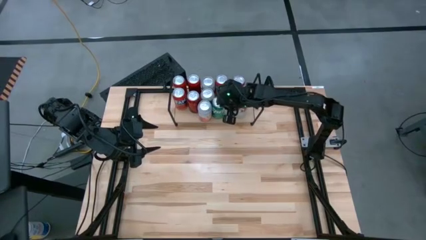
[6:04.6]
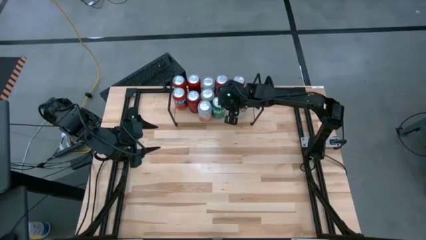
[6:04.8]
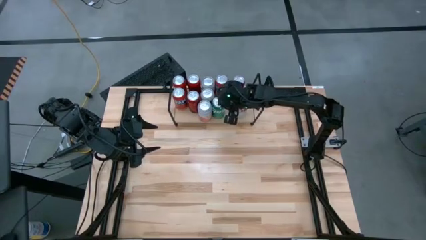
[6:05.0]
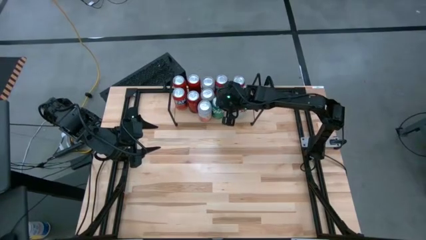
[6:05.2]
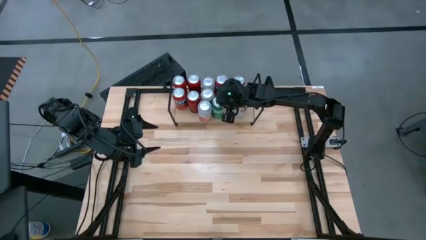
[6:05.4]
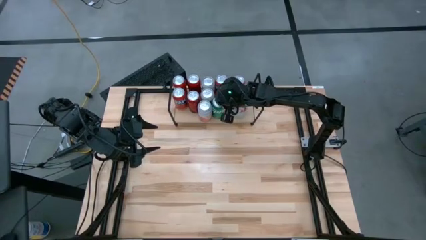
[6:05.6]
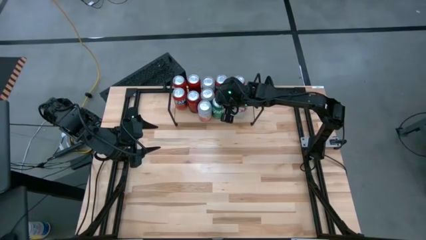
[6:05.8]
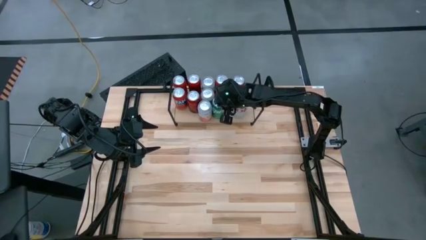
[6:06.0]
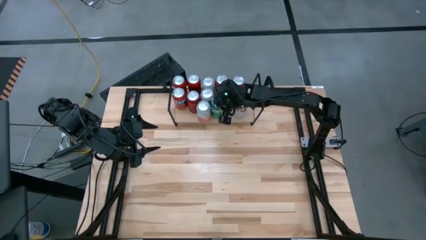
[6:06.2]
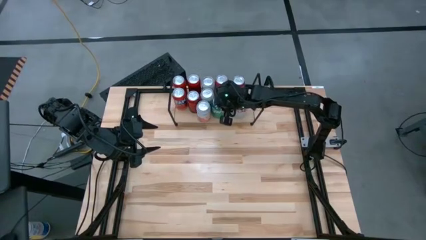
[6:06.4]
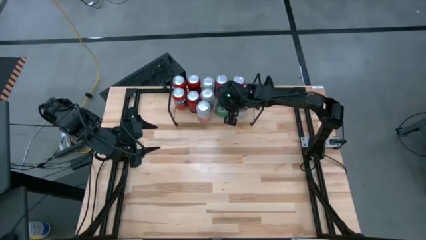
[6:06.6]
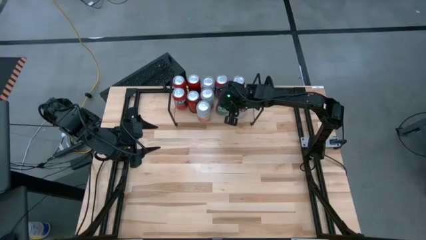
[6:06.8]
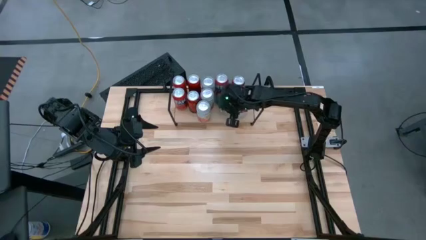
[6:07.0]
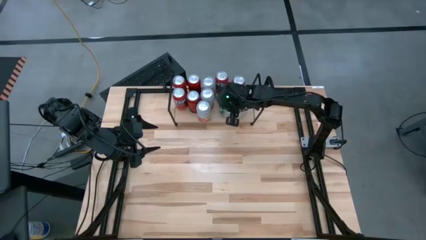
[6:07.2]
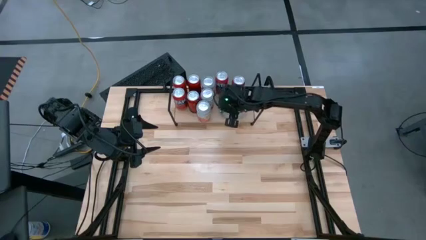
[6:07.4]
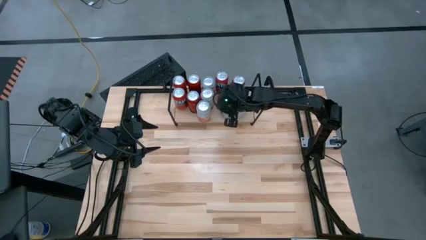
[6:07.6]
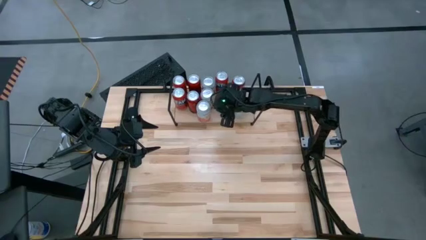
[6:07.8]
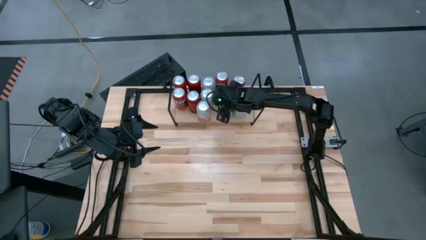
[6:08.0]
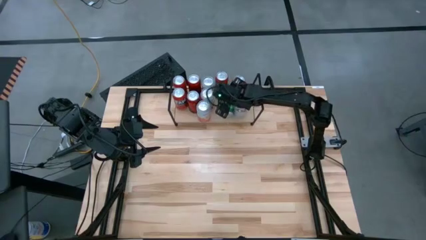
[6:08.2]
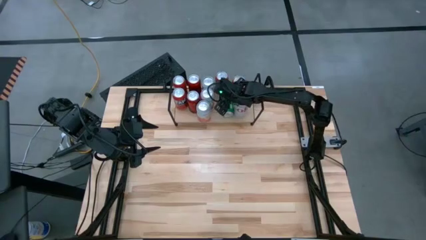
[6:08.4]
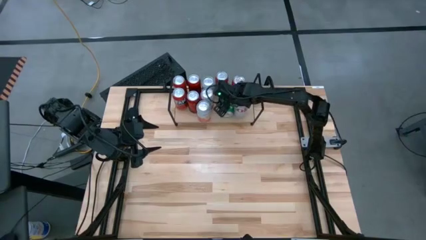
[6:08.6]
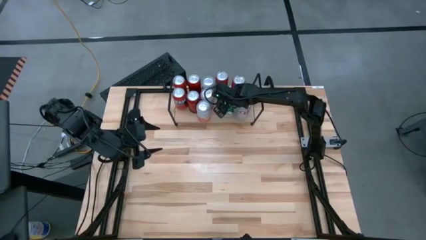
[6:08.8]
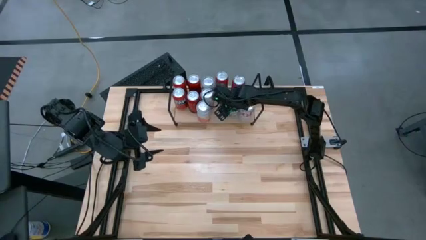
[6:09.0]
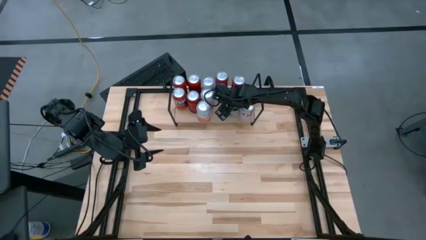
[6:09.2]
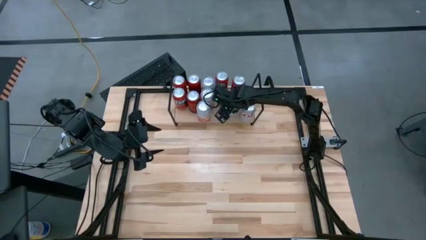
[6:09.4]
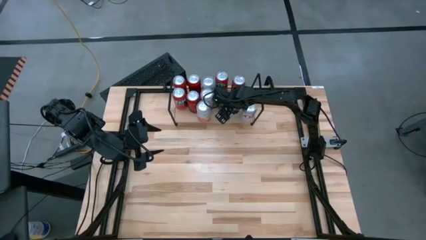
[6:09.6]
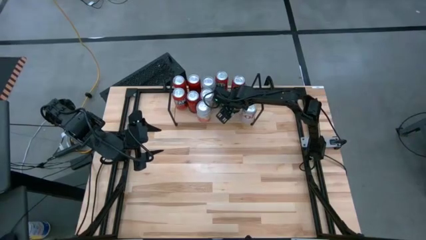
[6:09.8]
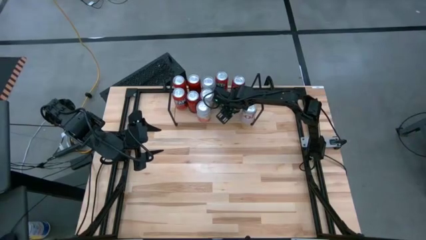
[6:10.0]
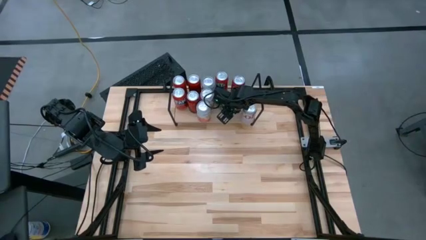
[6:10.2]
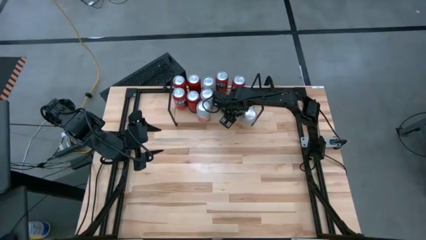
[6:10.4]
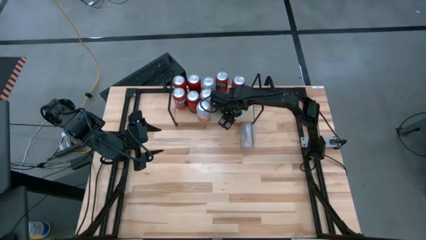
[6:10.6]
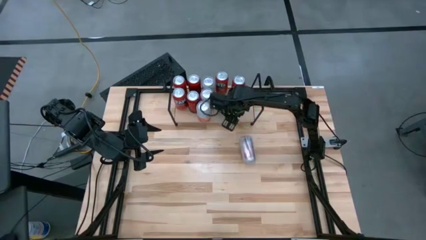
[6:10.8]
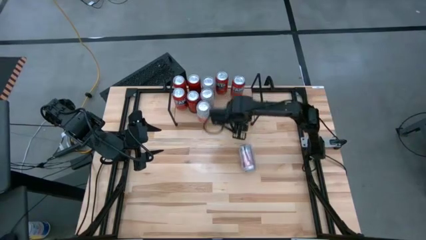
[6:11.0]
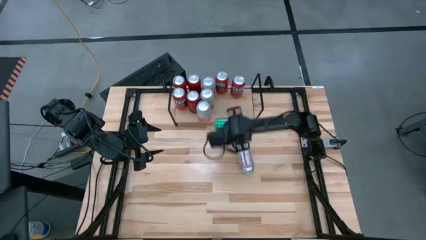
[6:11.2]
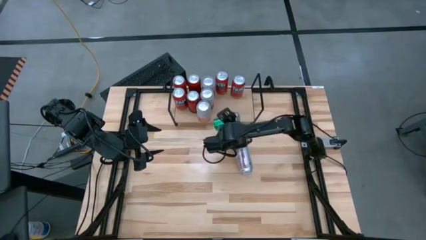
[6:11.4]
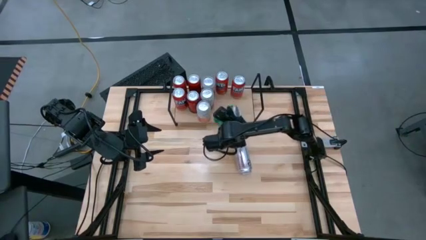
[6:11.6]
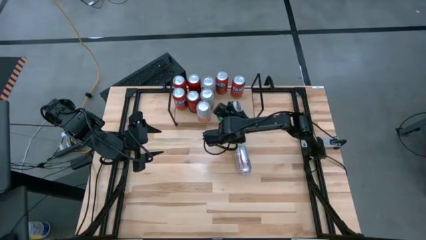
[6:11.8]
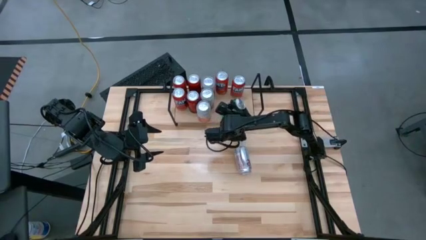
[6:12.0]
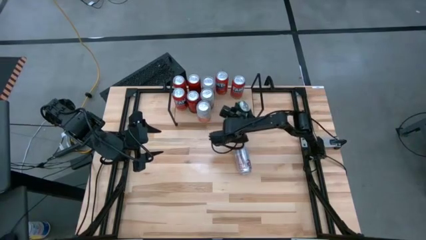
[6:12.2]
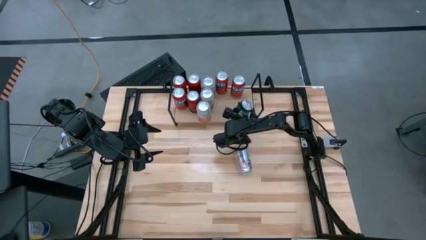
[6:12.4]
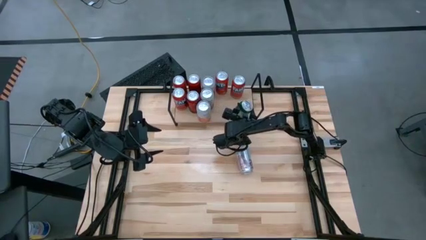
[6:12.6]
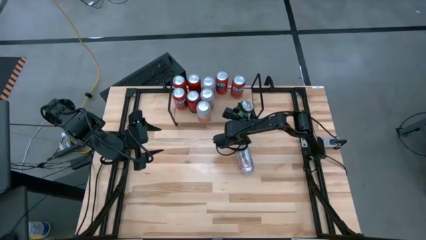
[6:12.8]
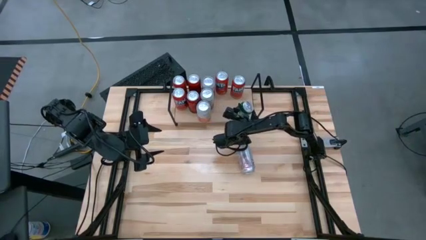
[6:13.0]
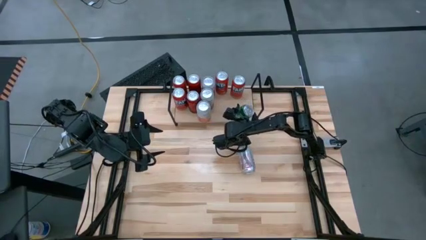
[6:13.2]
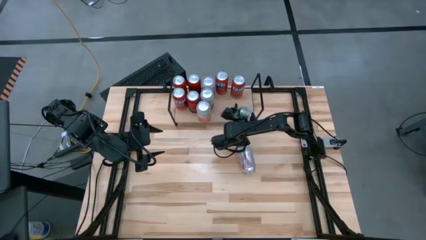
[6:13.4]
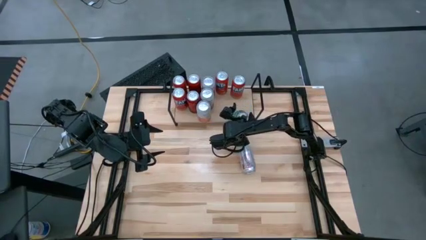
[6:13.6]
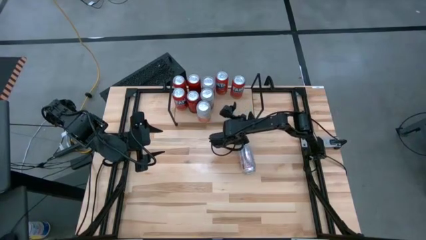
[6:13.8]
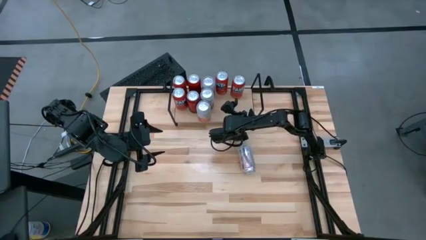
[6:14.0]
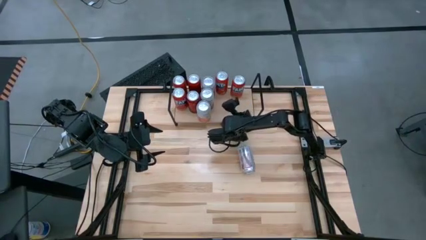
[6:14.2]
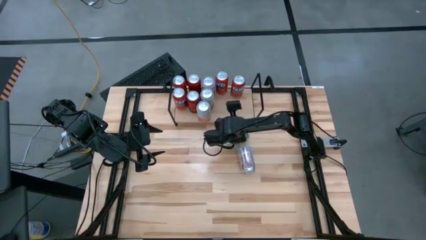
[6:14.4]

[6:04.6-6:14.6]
Task: Place canned beverage on shelf
Adjust the soda cans on the shelf

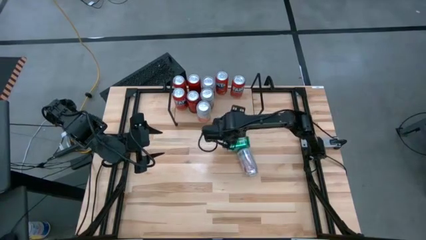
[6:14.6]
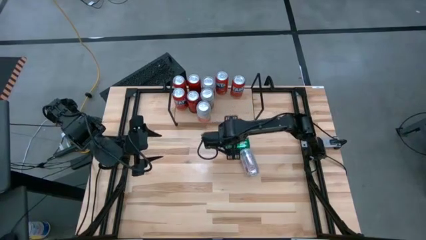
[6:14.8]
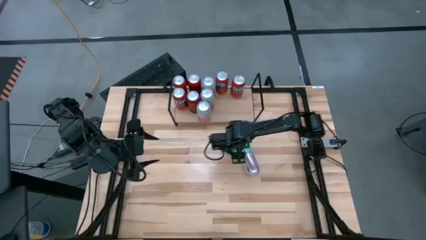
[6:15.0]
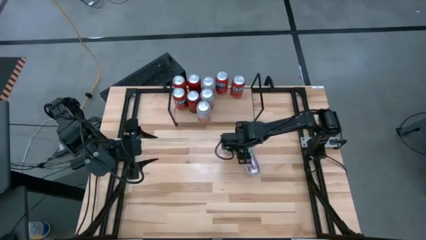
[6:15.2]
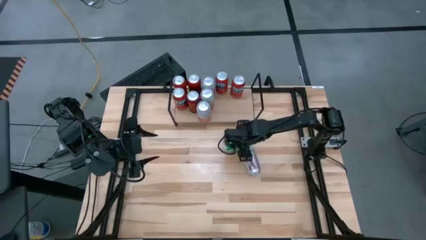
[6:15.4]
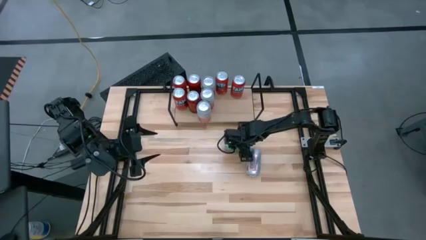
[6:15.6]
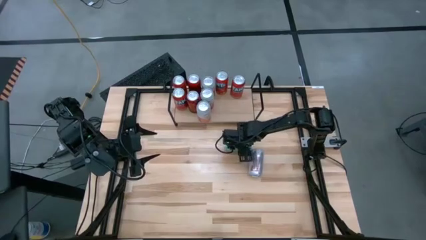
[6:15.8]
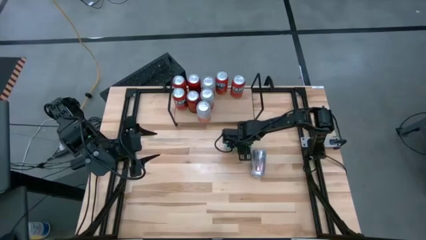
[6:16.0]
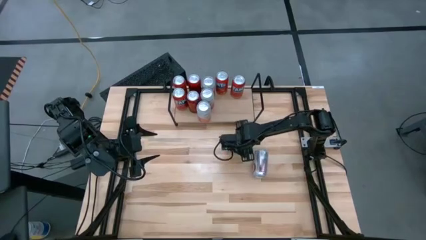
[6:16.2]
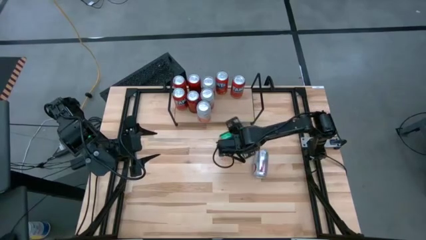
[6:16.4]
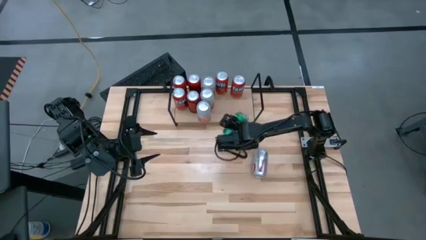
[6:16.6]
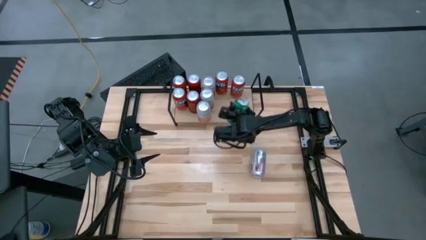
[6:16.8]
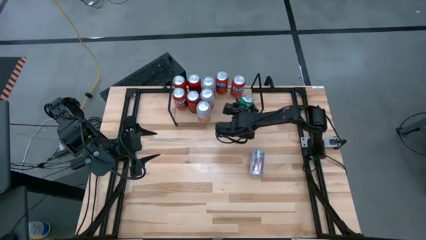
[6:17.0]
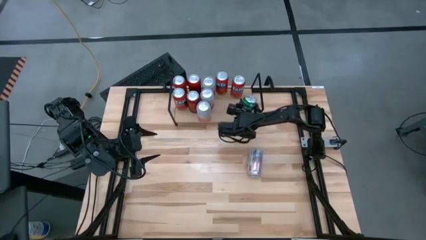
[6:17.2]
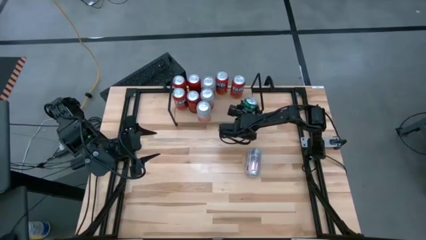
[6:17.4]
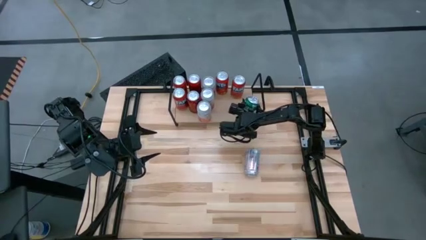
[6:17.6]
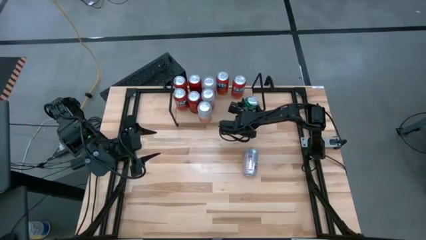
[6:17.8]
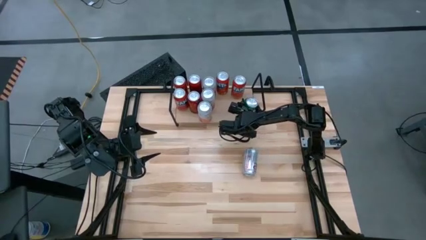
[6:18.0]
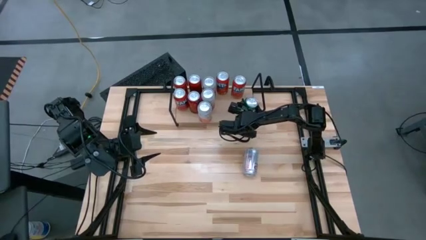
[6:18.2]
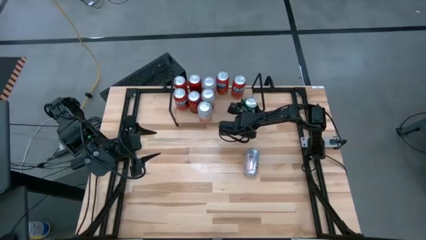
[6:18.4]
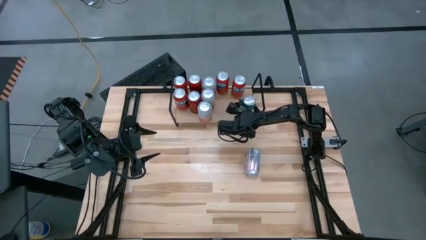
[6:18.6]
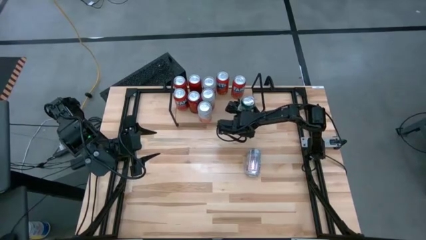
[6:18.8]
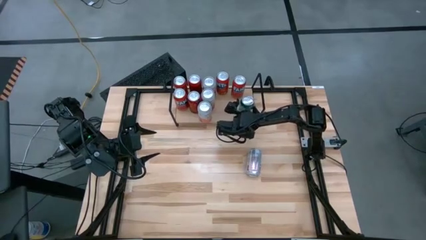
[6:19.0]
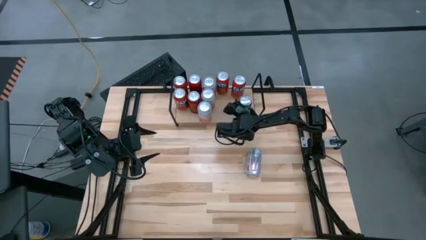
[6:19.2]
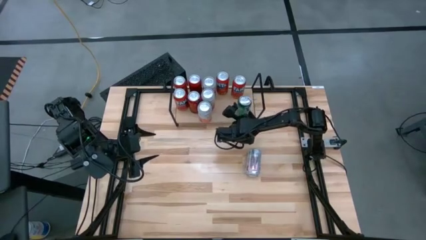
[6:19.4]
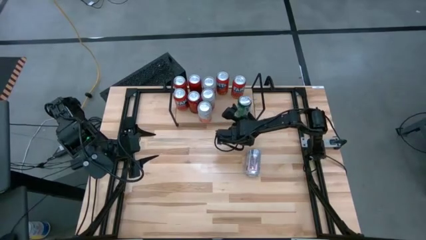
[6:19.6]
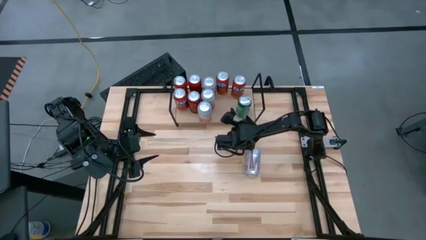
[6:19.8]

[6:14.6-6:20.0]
Put the green soda can on the shelf
